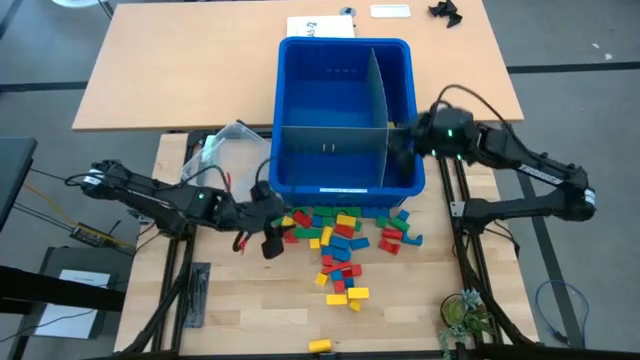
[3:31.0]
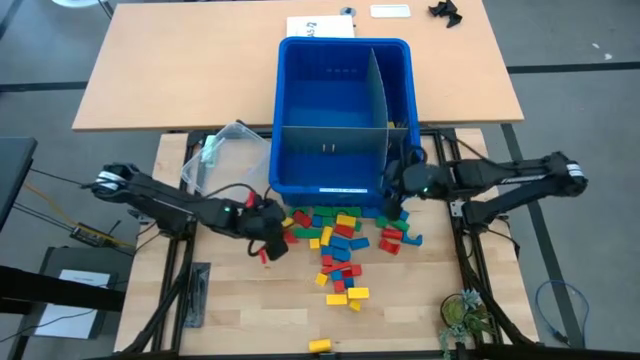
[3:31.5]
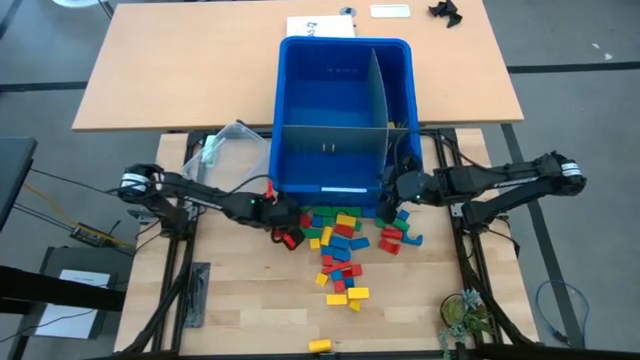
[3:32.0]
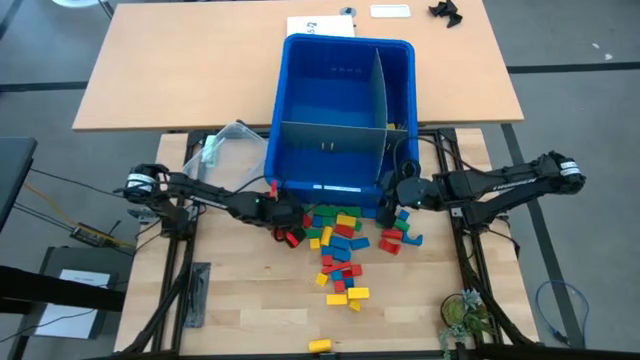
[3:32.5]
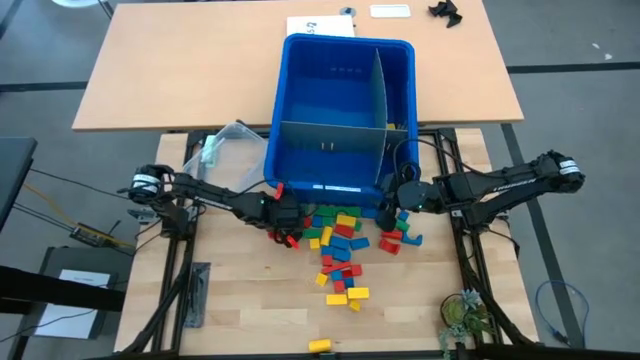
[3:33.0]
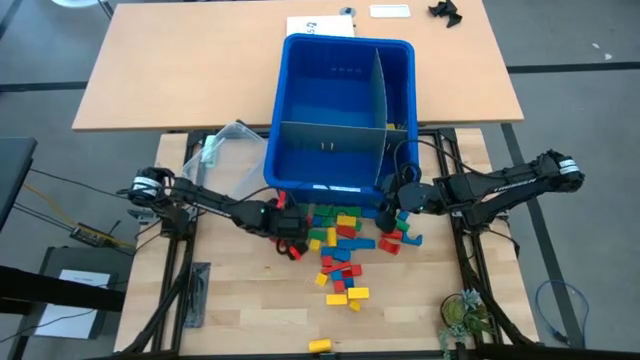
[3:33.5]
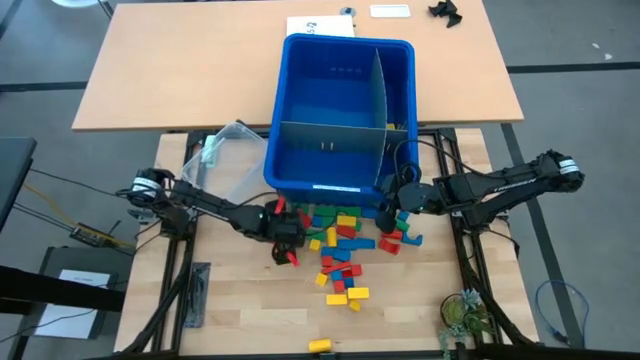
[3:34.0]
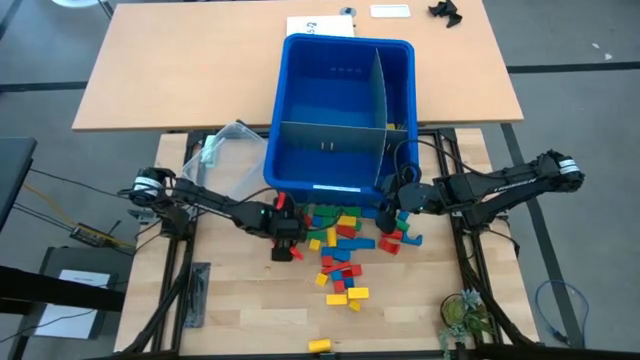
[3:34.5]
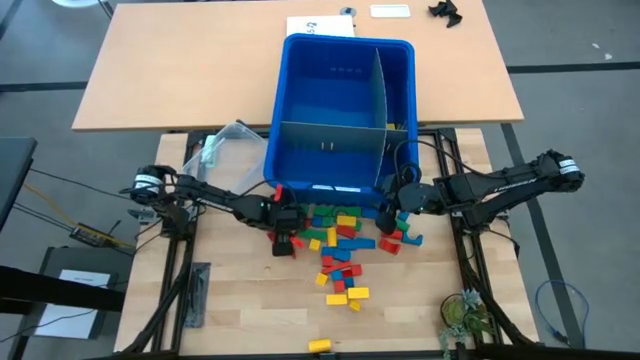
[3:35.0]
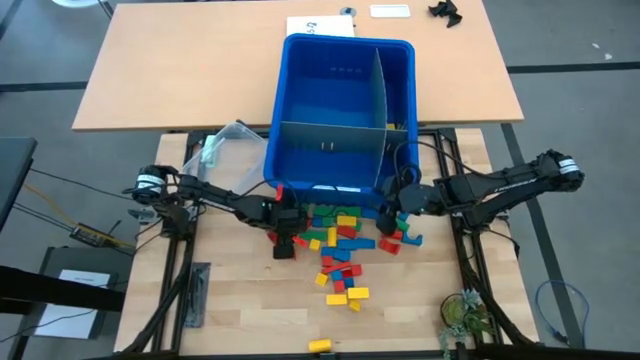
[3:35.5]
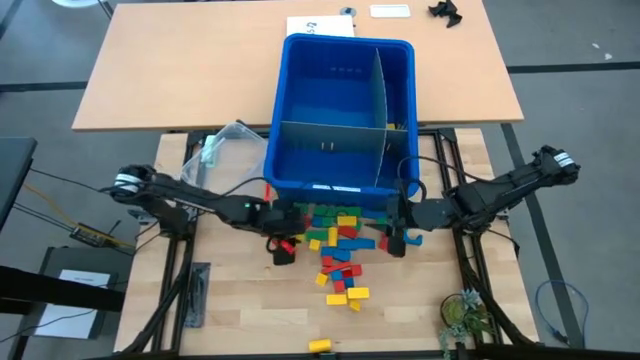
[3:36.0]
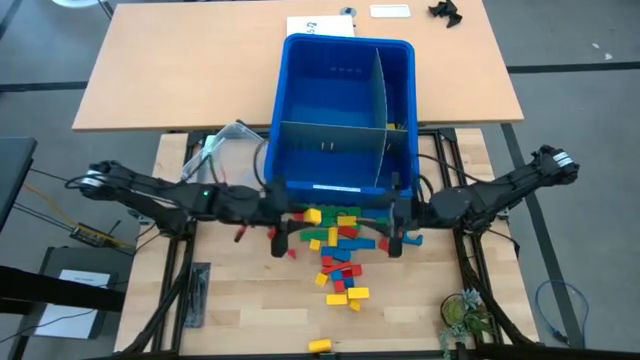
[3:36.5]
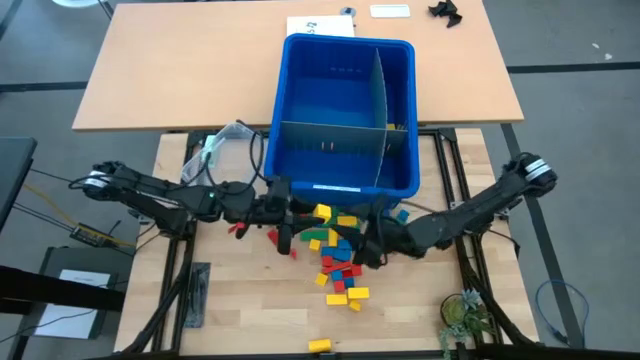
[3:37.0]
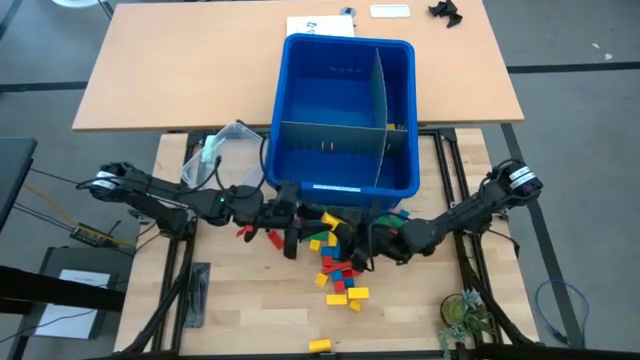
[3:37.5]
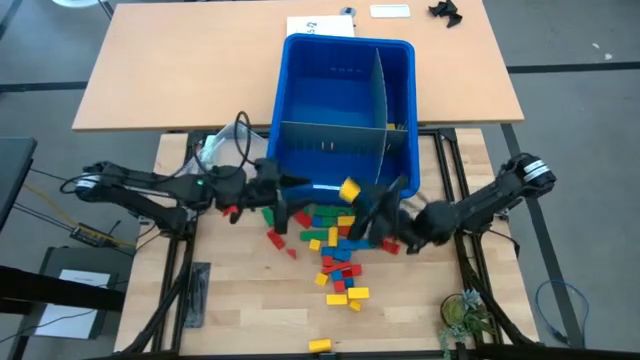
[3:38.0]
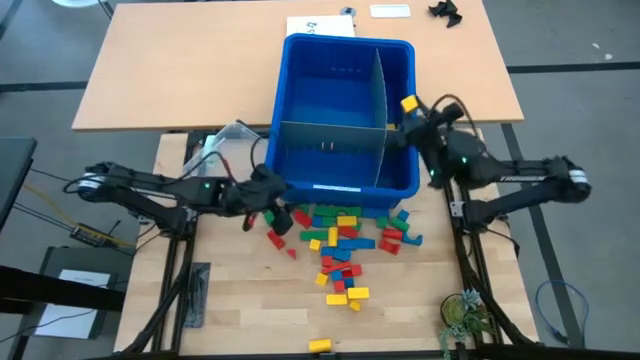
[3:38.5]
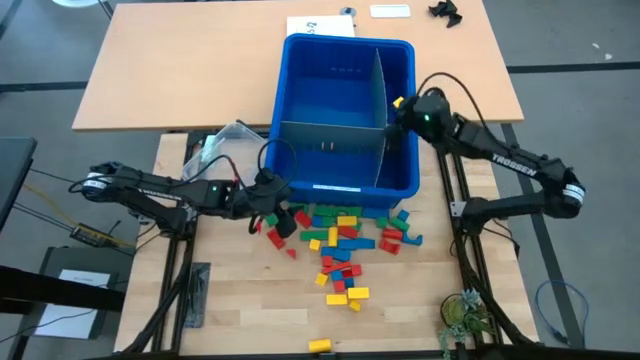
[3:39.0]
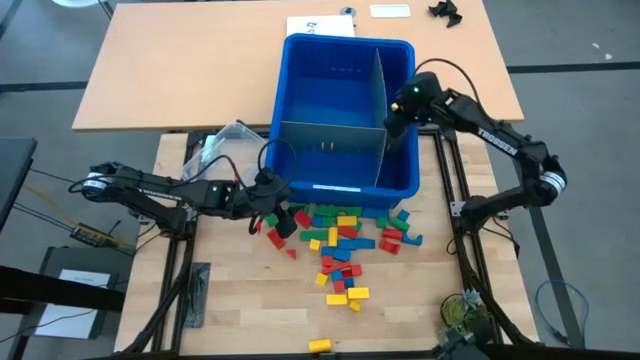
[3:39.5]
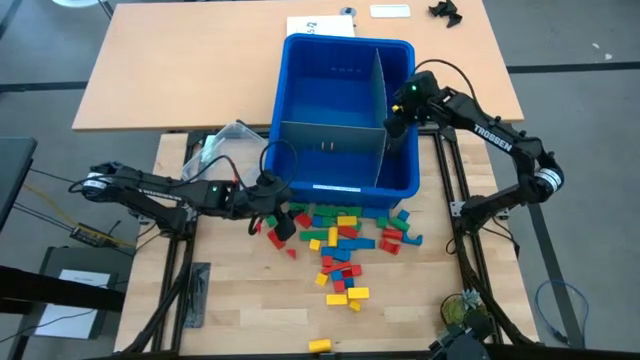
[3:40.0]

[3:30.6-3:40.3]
Task: Sort blocks
Put the yellow block into the blue bin

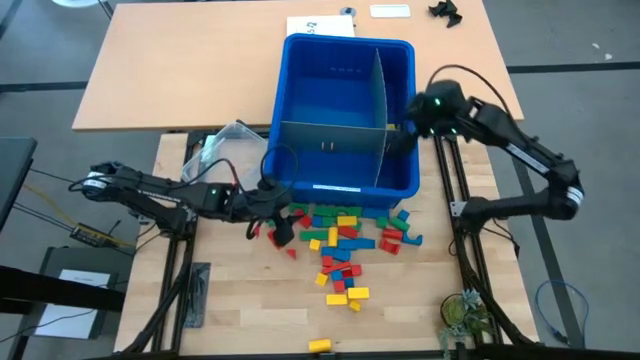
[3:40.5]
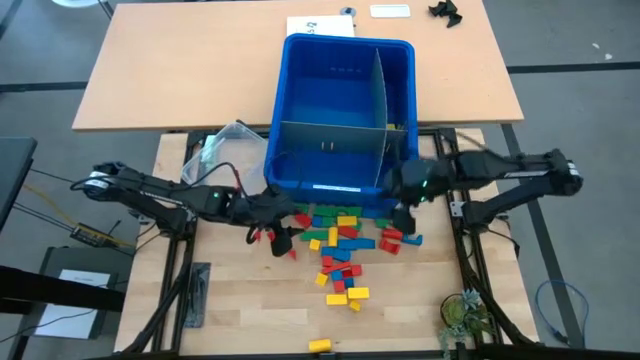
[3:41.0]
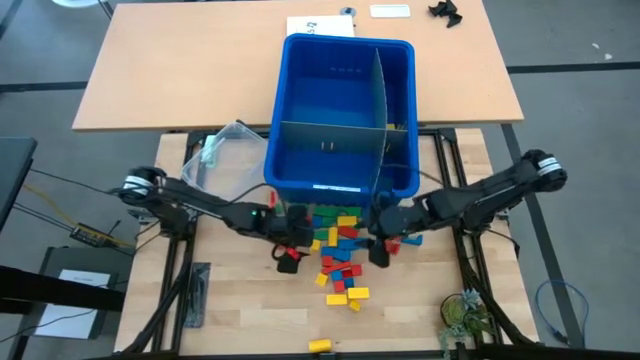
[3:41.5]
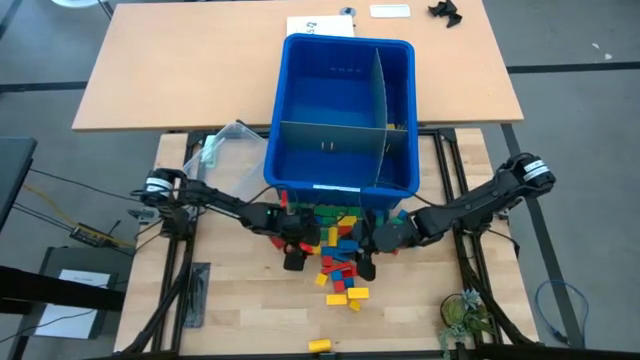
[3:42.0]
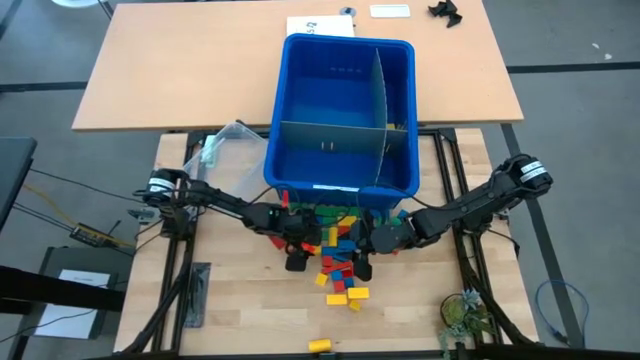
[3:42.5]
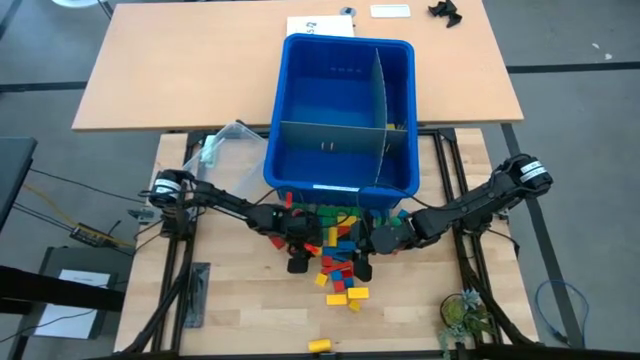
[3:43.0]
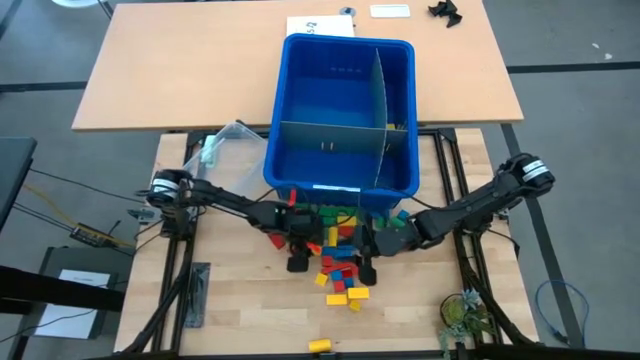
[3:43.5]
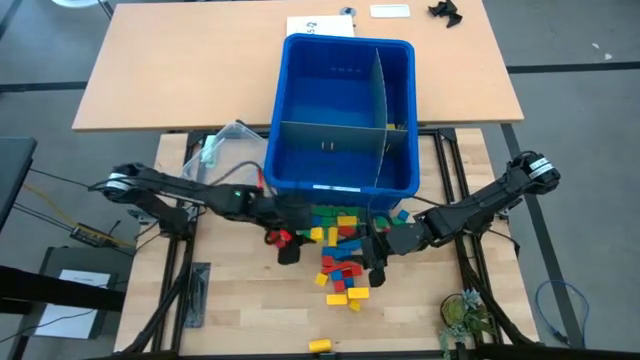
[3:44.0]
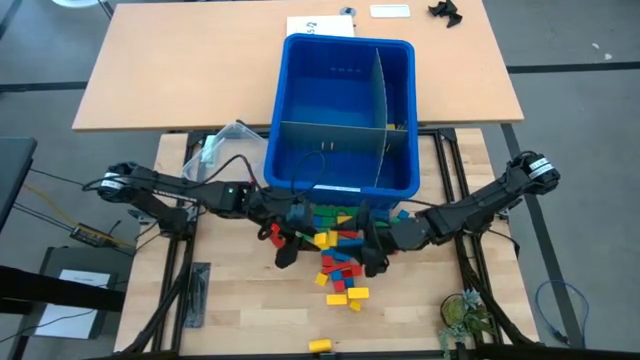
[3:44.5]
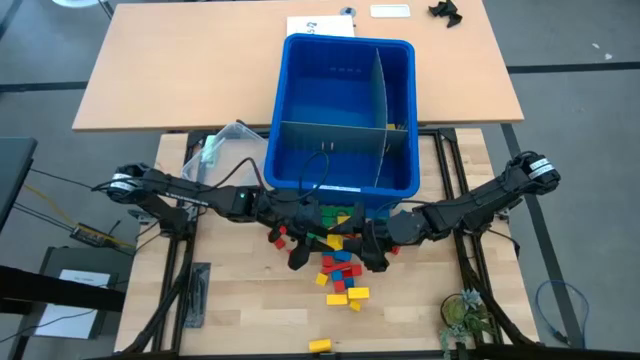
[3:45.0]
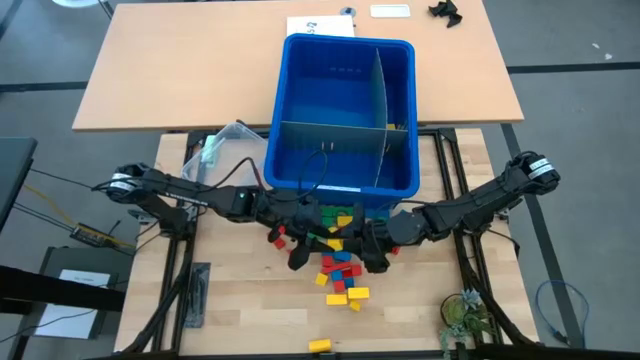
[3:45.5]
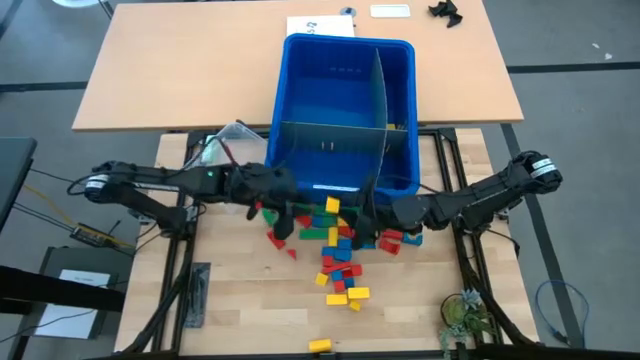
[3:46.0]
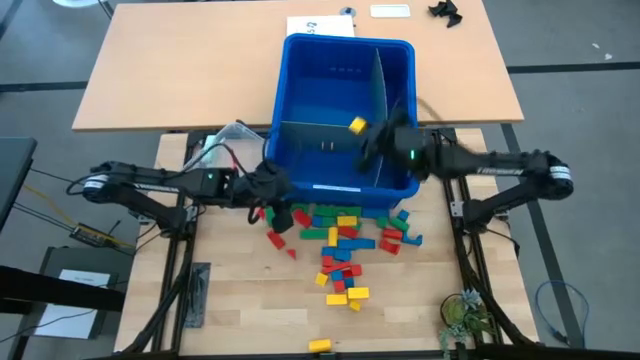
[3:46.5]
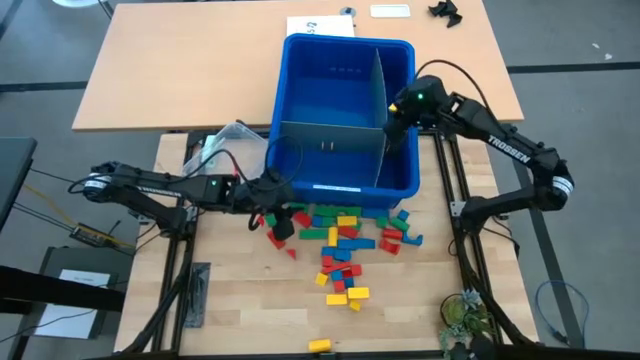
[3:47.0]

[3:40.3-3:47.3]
Put the yellow block into the blue bin

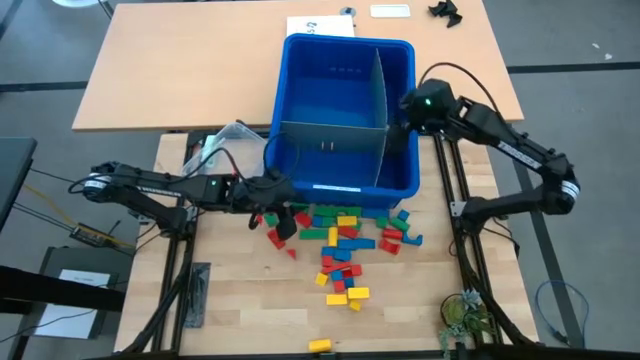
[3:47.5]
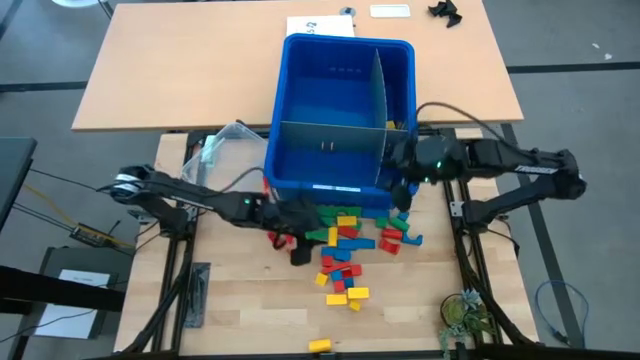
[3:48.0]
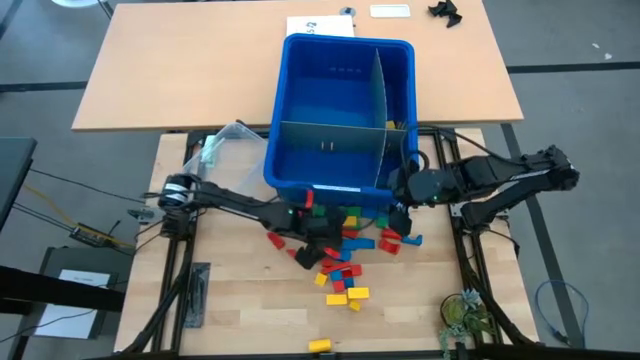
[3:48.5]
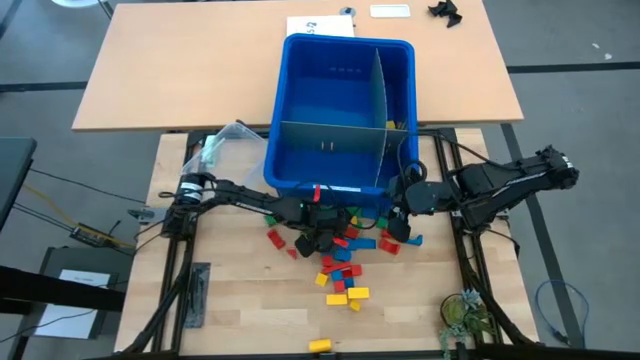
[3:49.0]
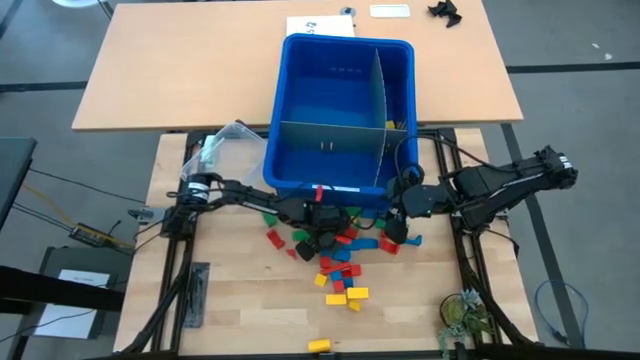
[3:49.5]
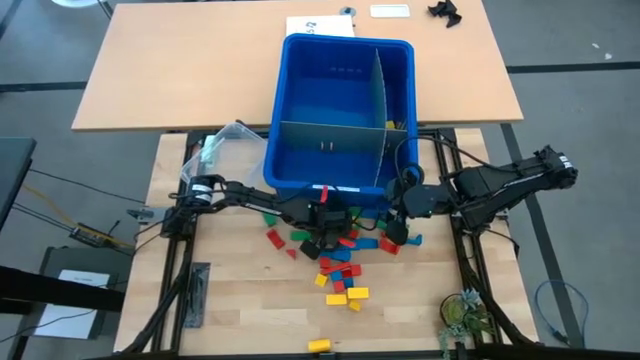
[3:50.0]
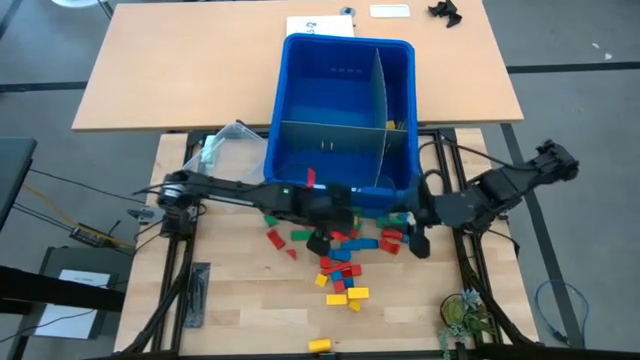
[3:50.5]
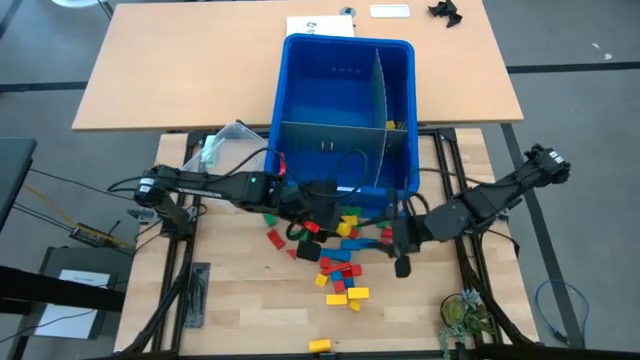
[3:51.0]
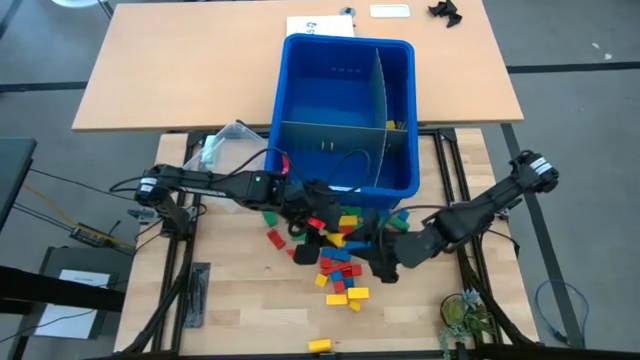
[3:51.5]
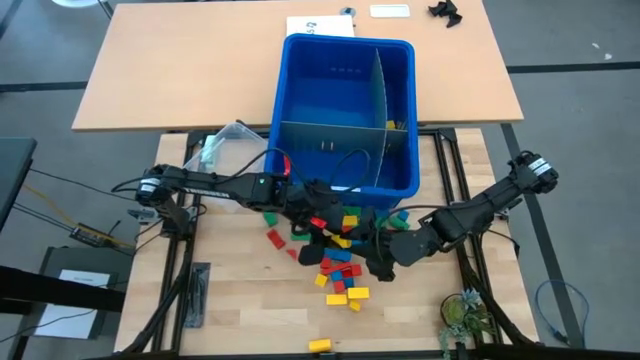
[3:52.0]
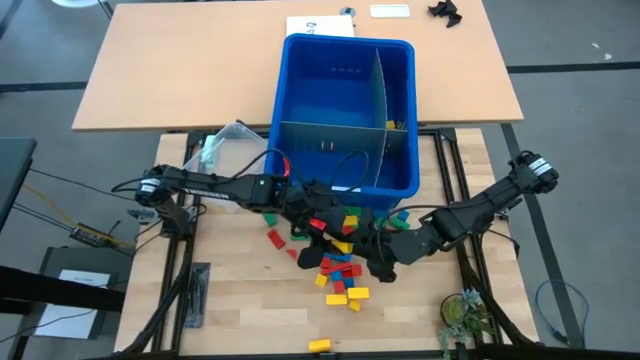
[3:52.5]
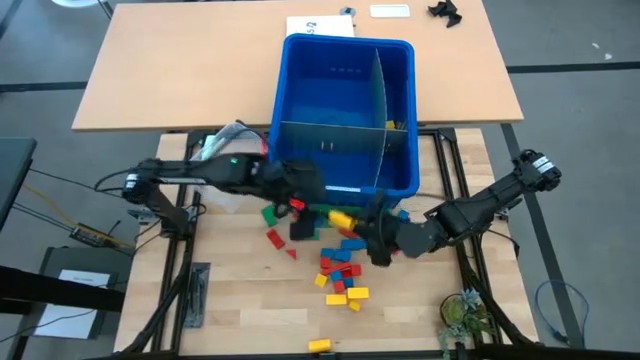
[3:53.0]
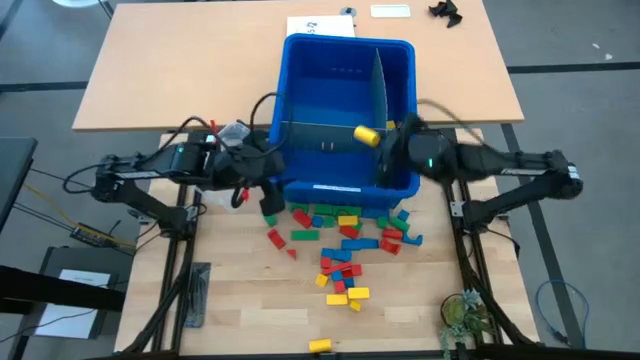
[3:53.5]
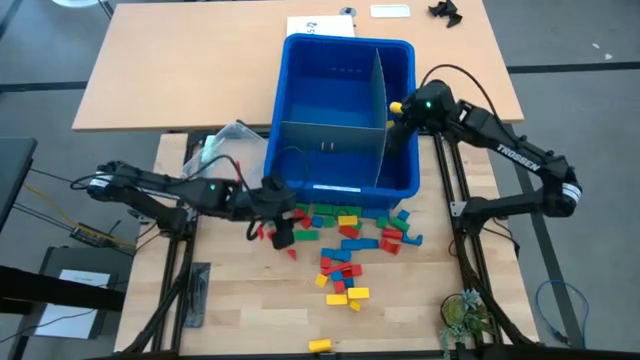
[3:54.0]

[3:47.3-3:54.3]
Put the yellow block into the blue bin
